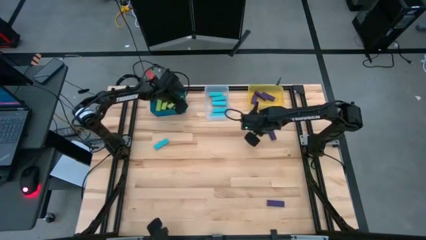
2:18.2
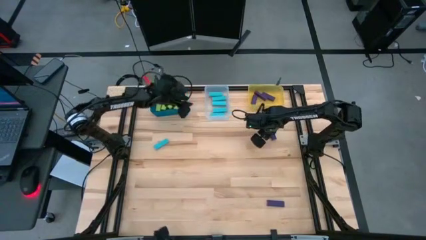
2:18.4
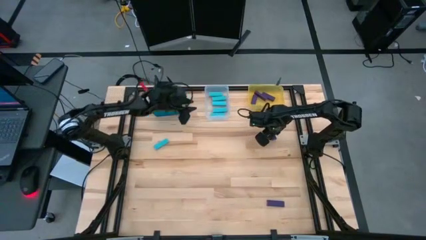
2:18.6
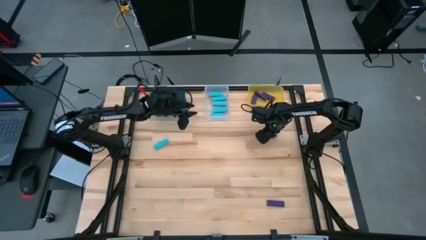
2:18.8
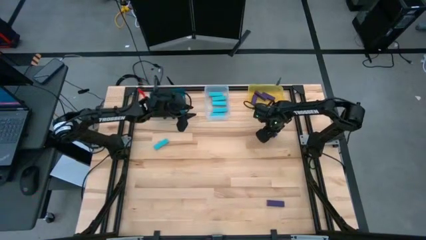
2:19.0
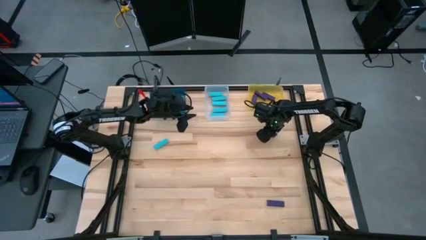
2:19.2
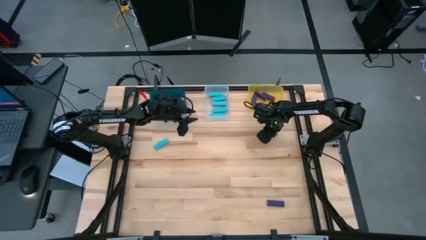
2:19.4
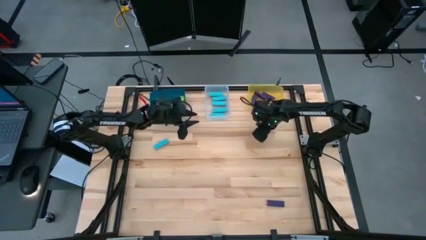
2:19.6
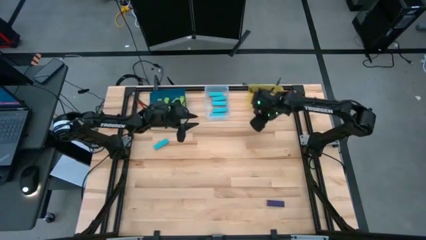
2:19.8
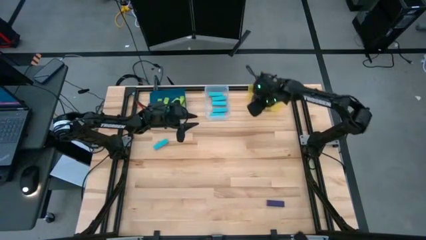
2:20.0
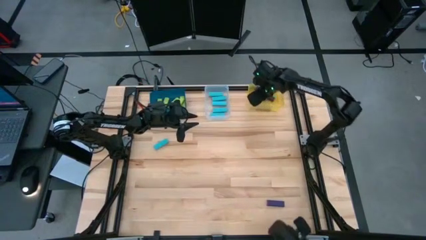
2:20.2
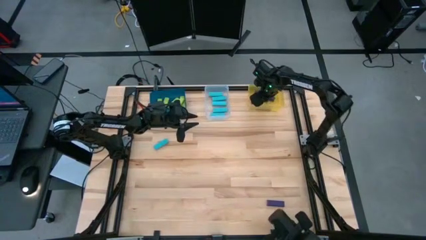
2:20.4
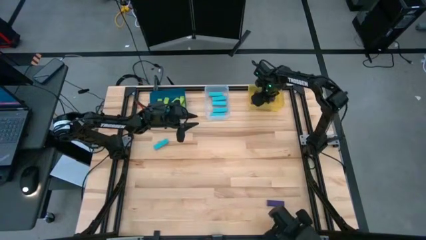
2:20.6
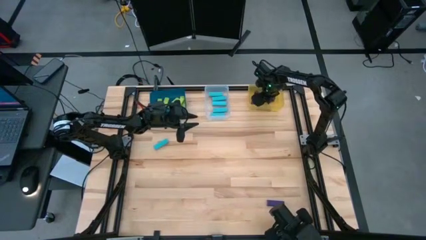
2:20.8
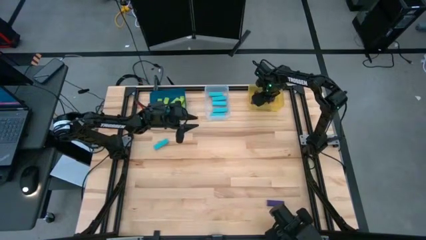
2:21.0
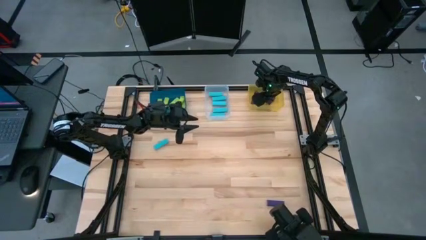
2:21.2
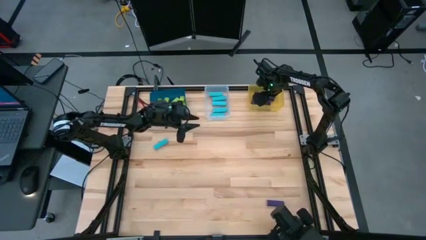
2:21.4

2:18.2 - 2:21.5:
Task: Sort blocks
Put the violet block into the yellow bin

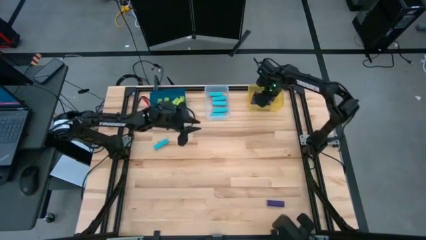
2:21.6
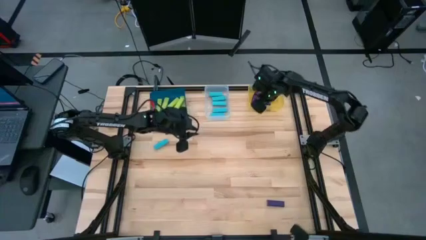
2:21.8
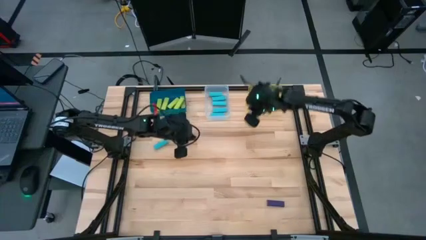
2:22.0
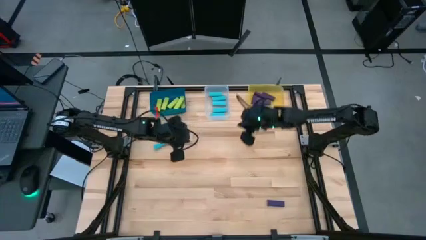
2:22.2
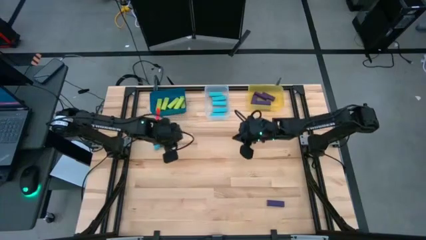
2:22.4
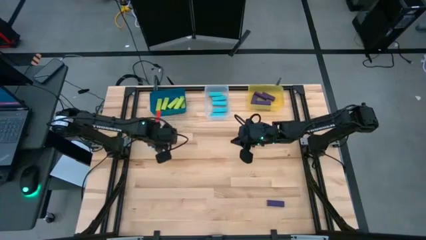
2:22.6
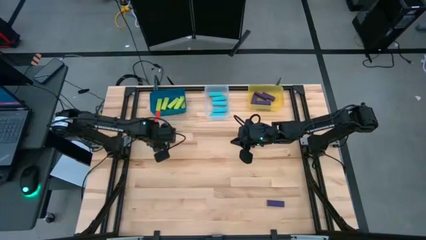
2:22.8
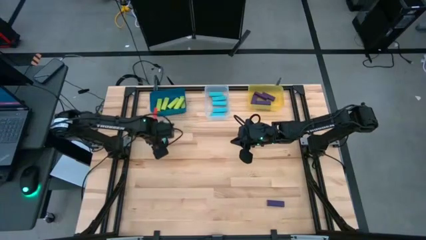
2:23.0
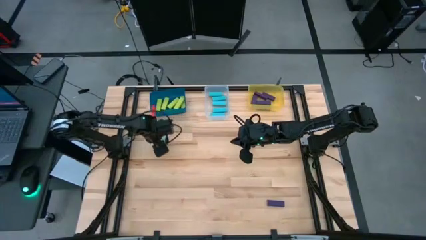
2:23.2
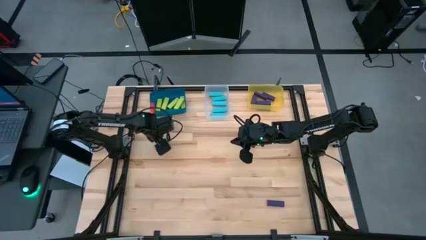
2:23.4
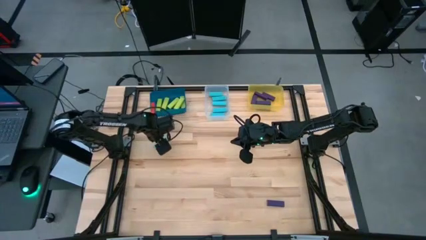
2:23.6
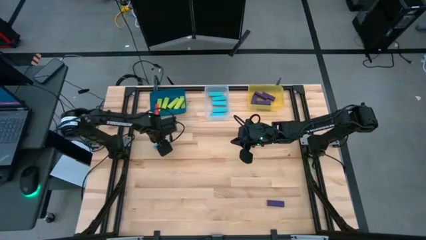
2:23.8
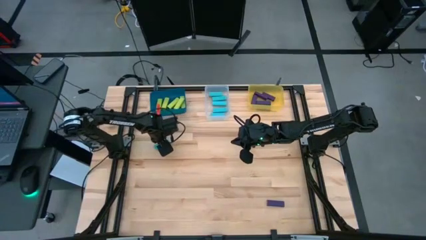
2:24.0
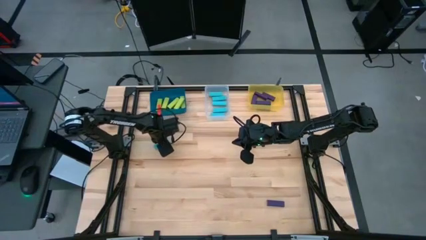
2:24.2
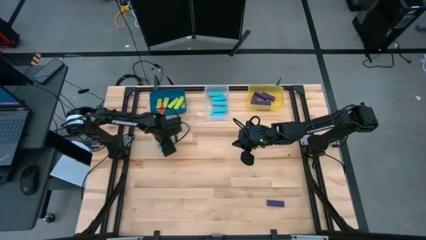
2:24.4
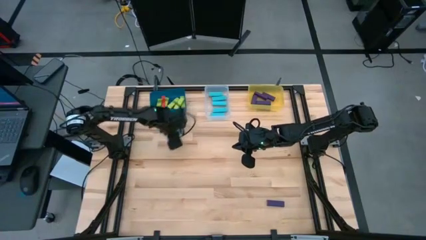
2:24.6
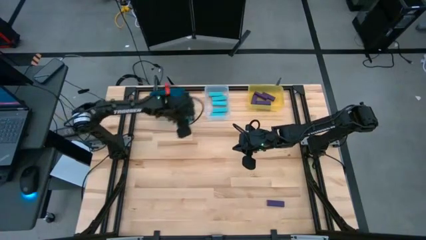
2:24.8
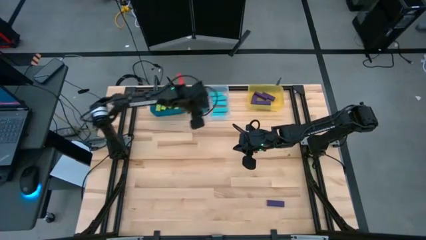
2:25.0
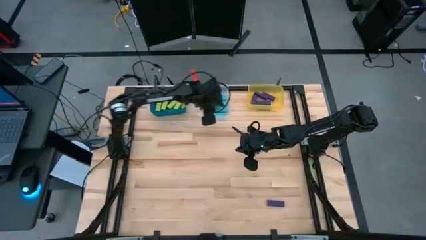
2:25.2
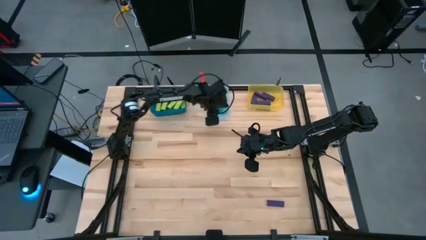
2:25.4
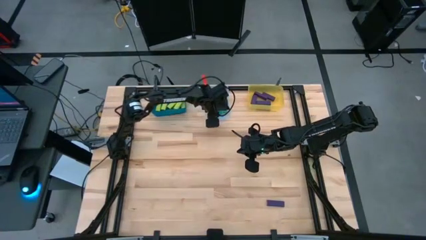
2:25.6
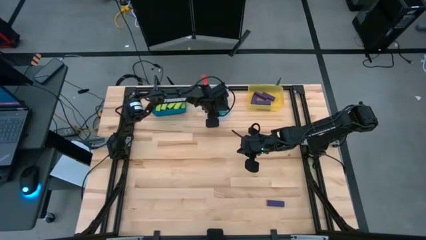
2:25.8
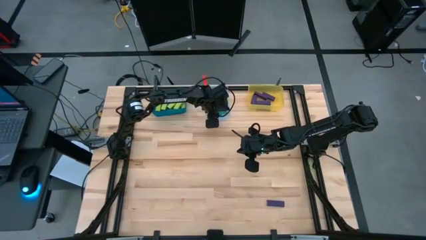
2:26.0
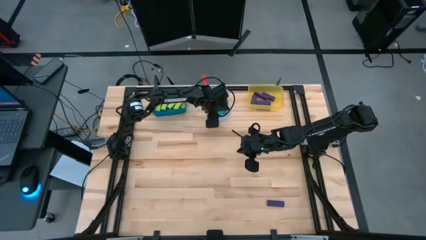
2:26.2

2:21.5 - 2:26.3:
Put the blue block into the transparent bin

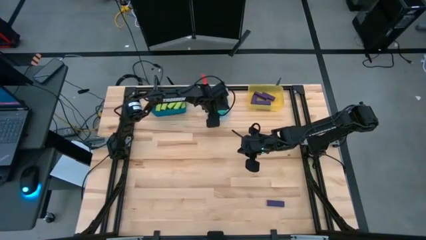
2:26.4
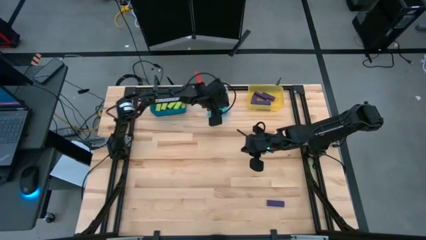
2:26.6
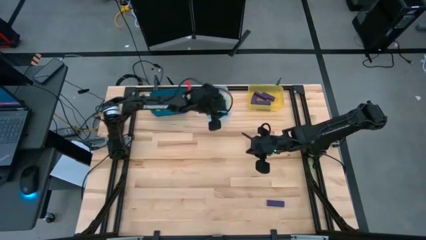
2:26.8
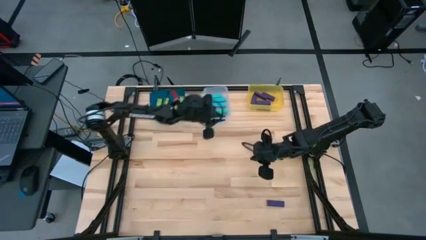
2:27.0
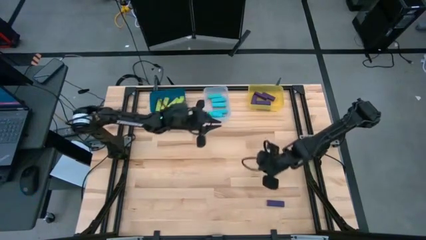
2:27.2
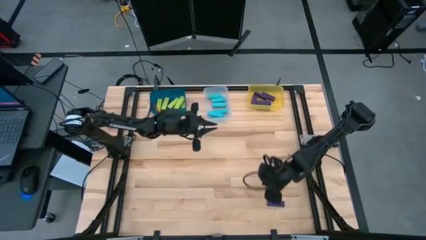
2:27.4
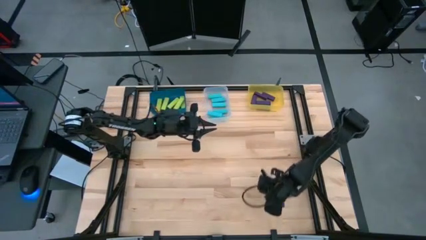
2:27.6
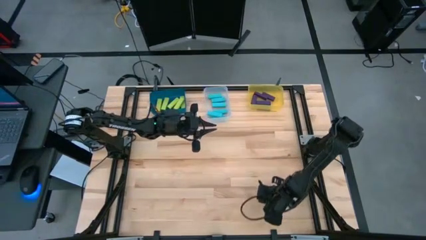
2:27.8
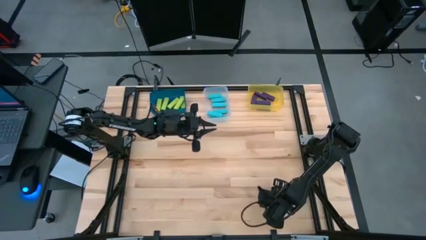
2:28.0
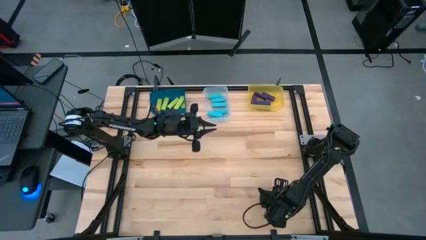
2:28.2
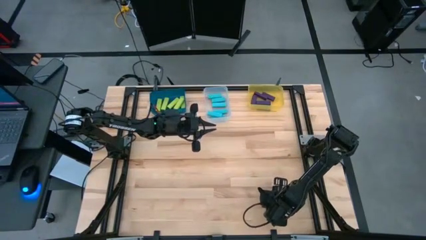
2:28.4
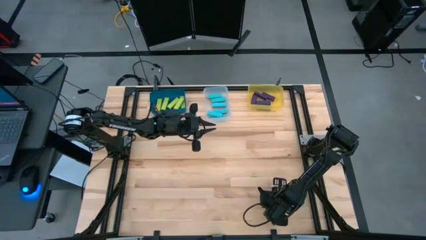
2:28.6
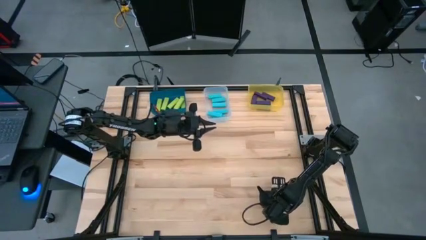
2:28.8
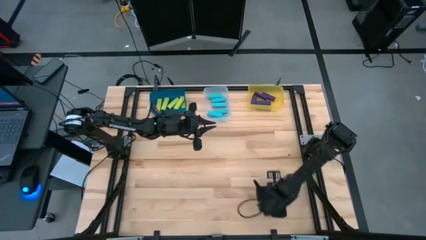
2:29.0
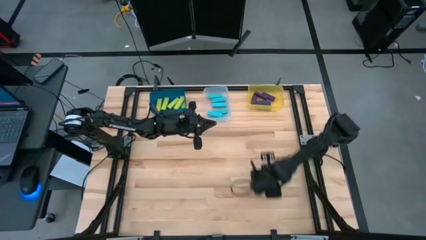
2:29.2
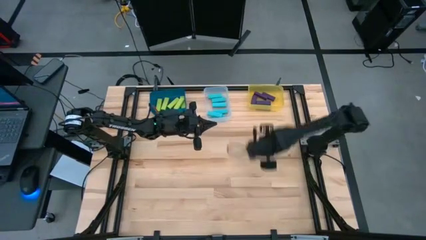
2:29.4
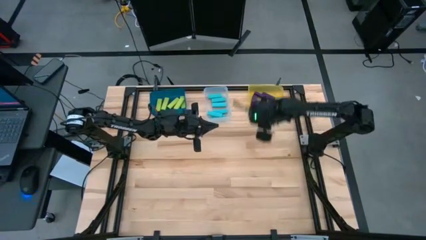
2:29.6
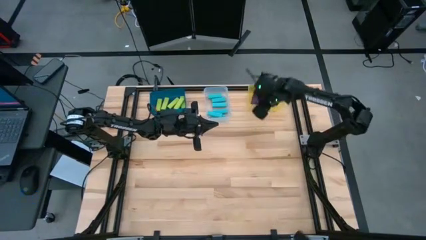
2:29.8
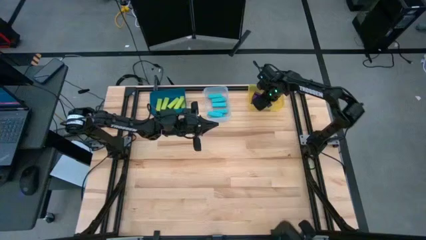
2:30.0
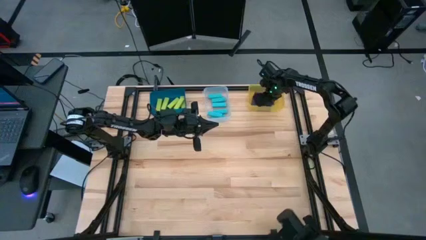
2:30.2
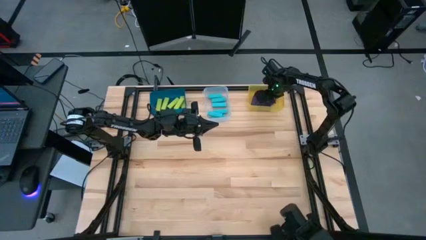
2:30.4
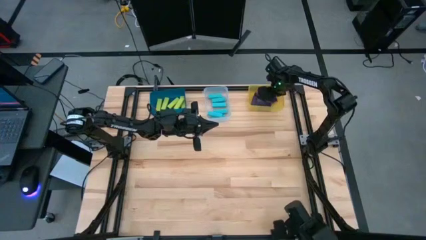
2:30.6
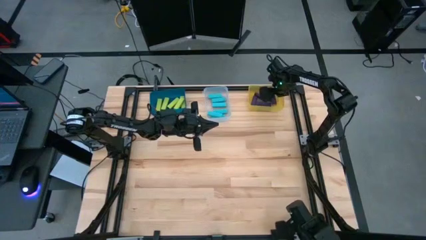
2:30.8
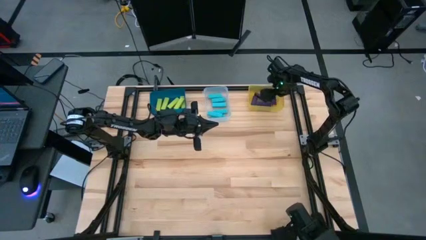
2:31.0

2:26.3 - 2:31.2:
Put the violet block into the yellow bin
